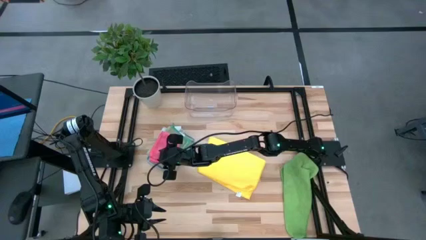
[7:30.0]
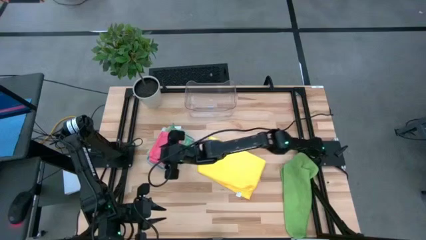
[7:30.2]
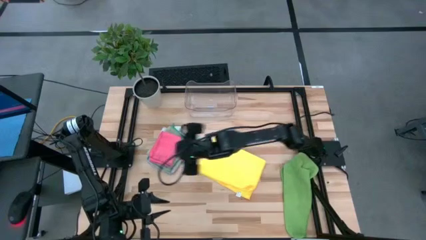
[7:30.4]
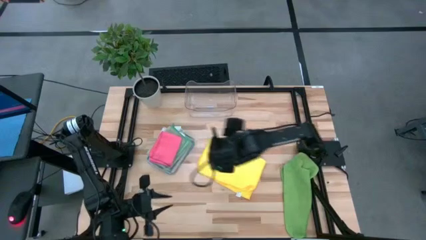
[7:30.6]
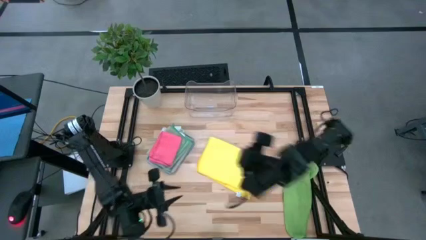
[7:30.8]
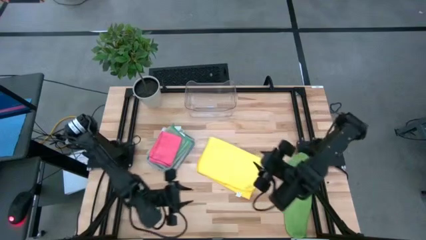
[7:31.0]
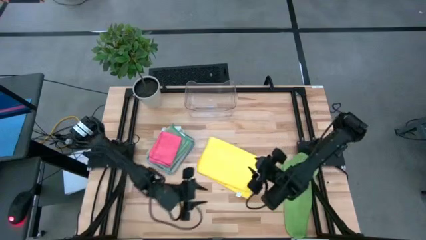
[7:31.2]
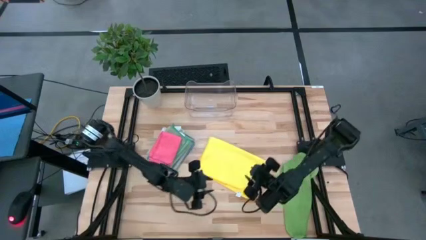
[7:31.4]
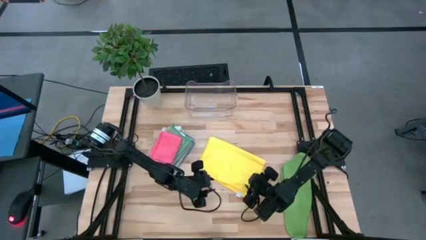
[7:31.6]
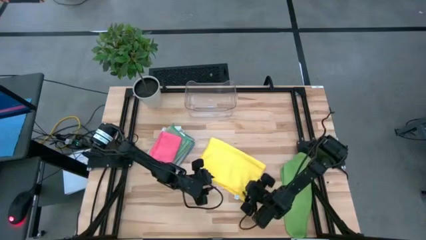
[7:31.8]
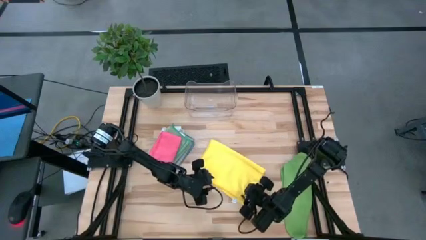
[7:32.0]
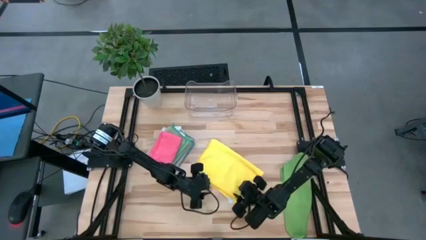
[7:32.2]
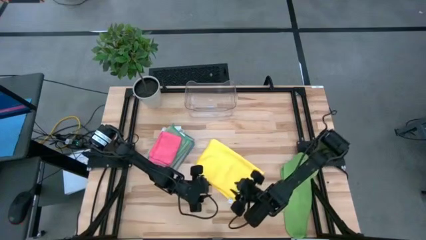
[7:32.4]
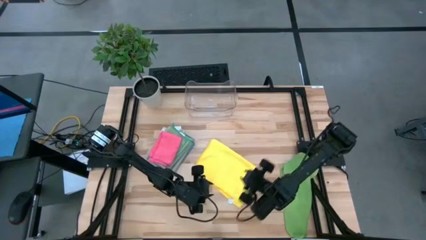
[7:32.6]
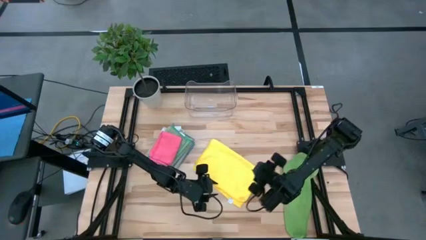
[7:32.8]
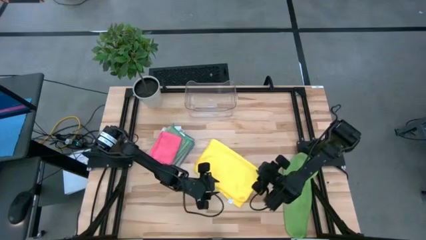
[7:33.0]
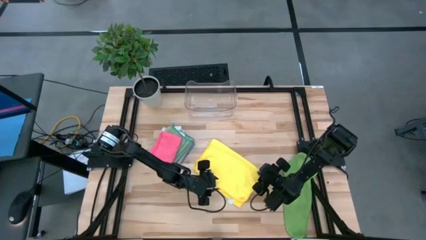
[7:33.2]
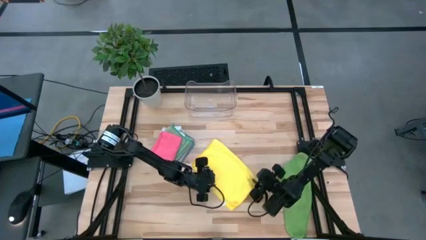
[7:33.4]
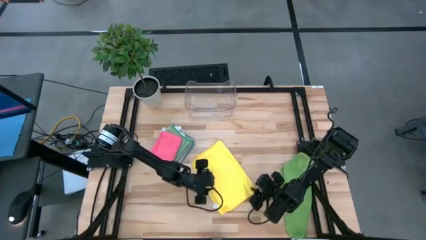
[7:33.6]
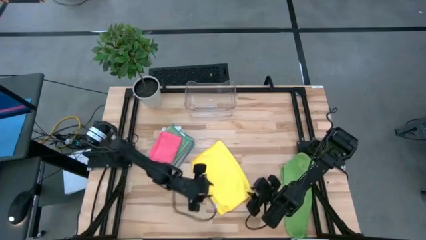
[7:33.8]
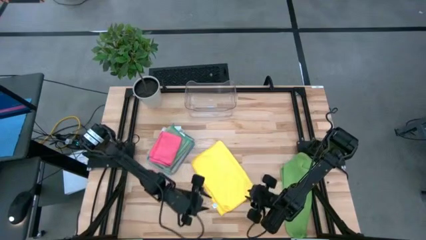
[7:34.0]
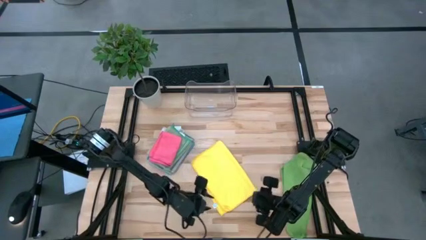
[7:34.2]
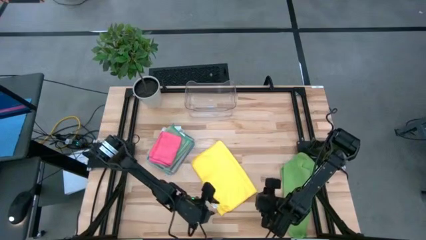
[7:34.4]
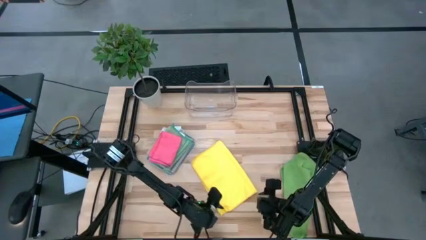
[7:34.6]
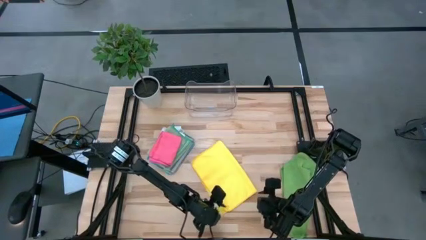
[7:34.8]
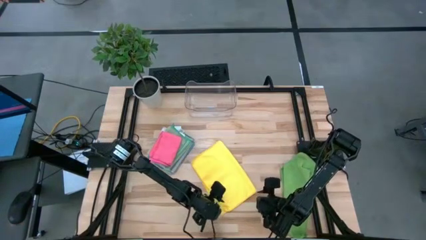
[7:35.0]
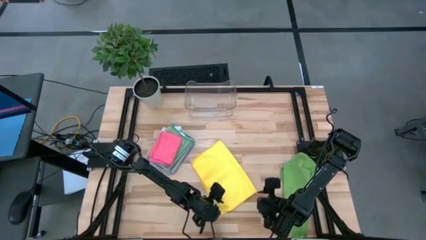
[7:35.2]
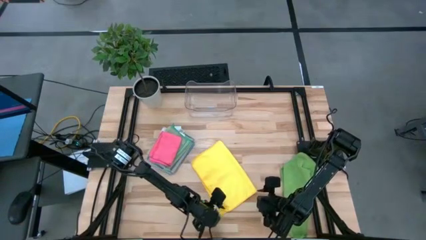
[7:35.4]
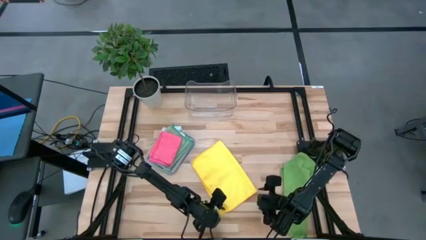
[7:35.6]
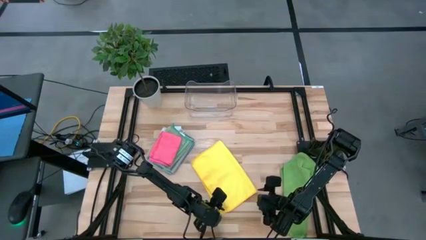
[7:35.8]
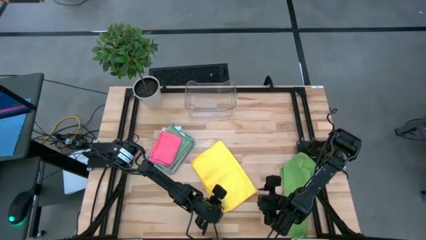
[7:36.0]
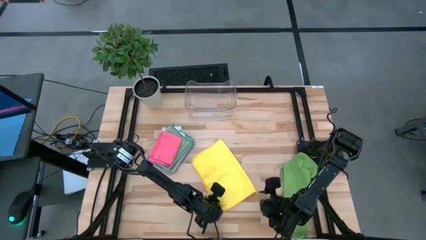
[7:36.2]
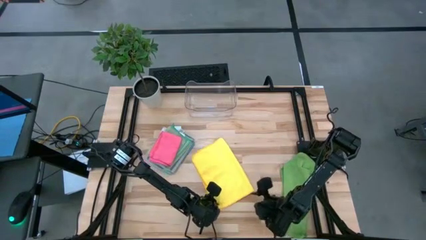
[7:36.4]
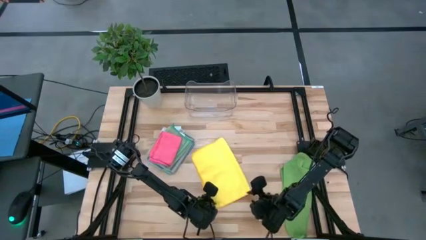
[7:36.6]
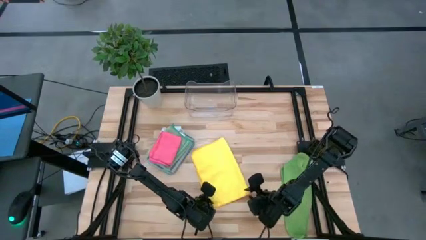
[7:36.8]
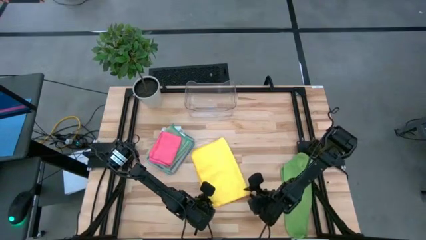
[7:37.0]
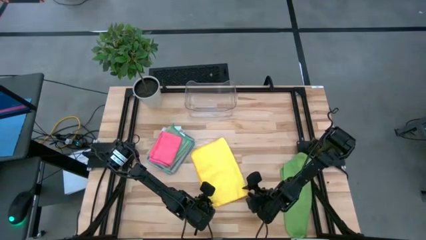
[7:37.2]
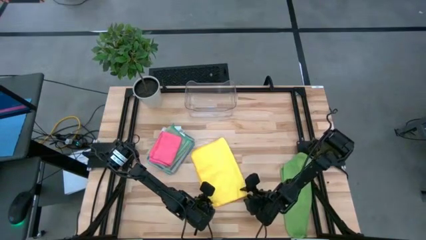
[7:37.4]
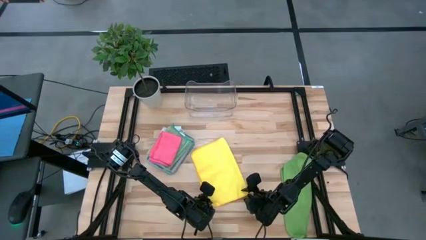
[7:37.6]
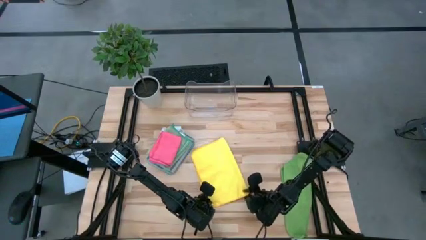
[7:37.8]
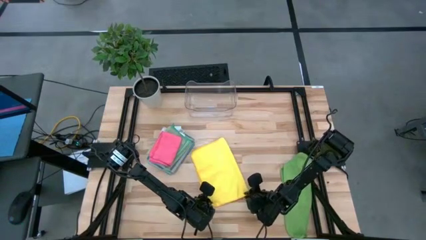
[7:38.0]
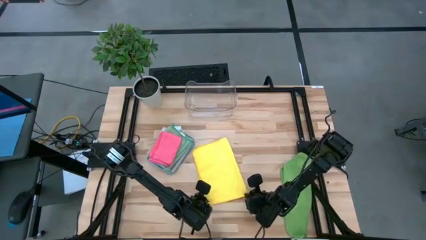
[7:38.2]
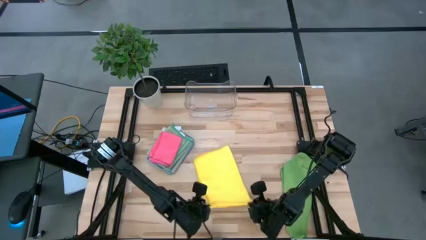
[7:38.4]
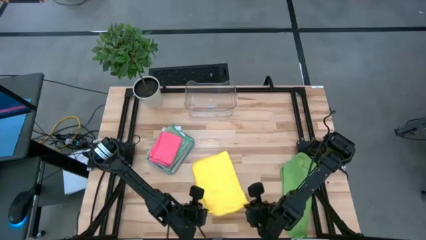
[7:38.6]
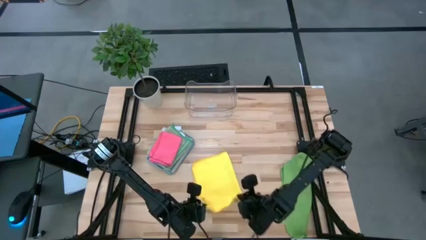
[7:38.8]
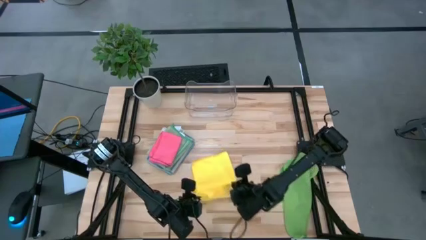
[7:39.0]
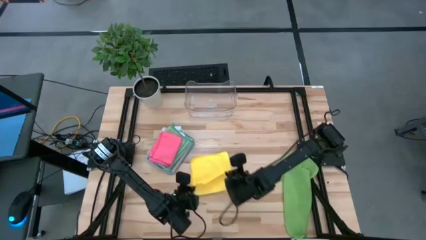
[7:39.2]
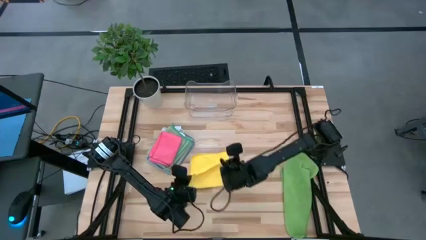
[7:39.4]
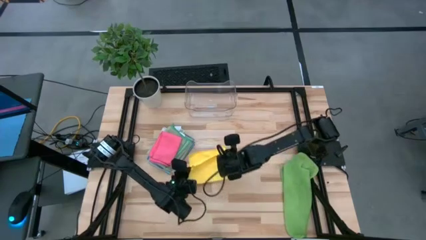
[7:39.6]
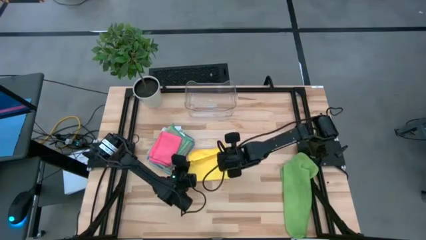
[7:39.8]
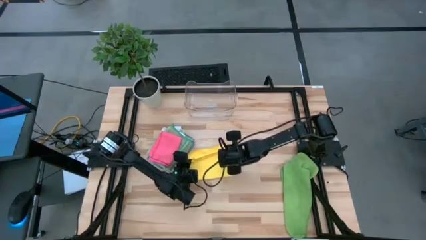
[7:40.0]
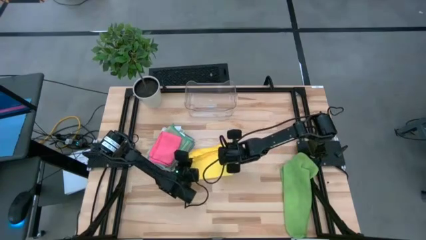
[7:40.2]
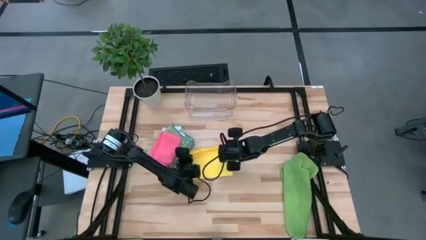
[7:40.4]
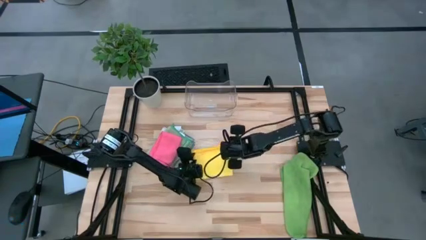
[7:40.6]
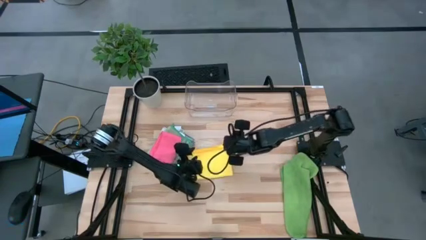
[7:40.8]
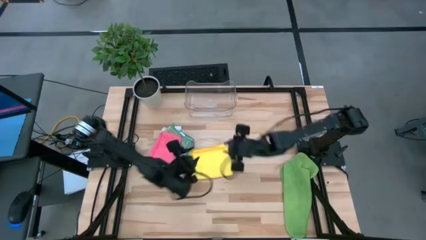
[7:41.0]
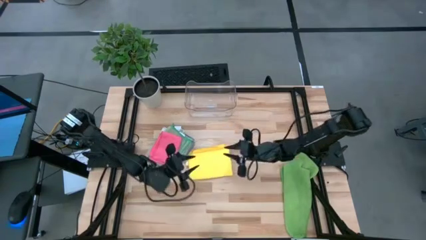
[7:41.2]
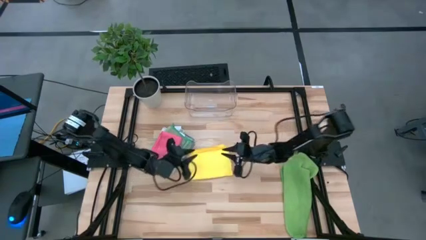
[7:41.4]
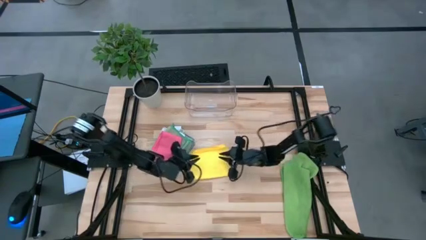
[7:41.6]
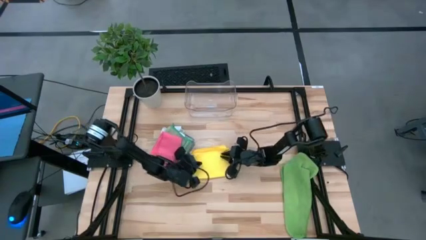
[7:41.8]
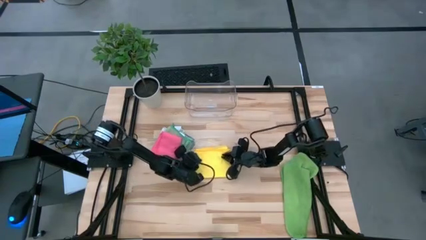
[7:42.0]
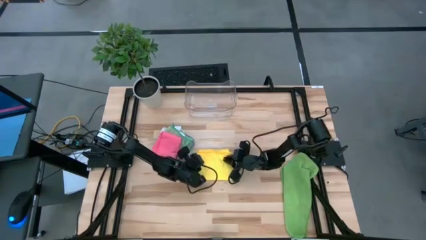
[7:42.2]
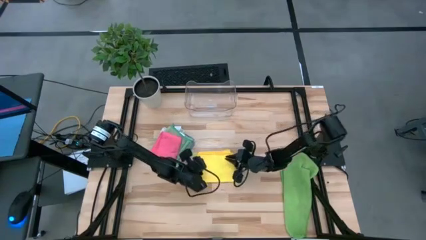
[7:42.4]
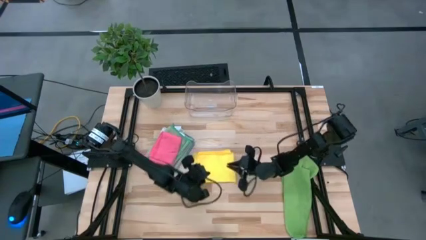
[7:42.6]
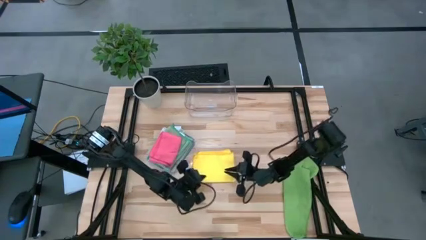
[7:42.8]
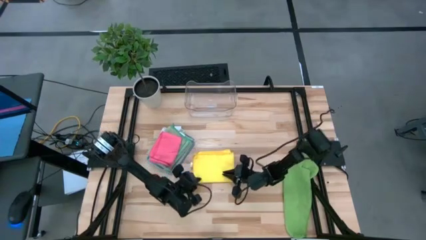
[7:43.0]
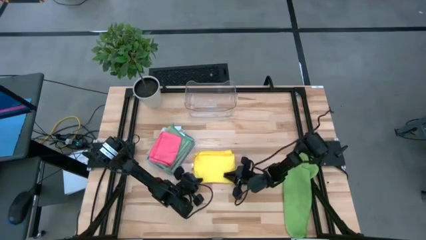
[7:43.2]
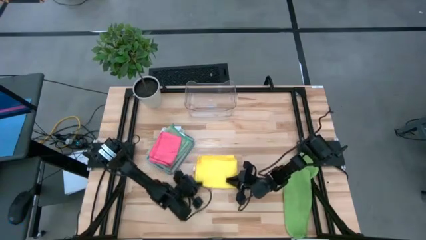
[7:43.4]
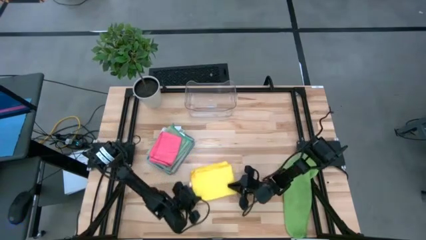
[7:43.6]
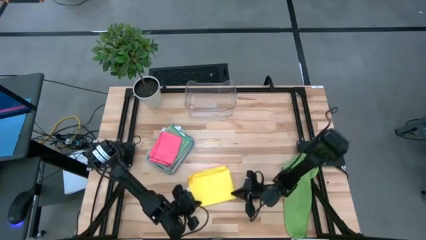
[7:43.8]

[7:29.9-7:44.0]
Task: Fold microfiber towels
Fold the yellow microfiber cloth
